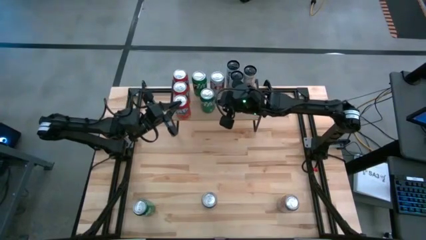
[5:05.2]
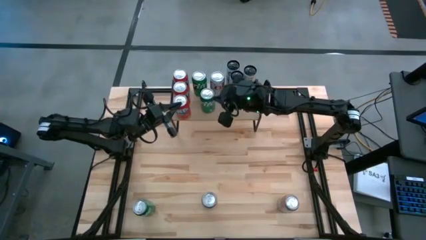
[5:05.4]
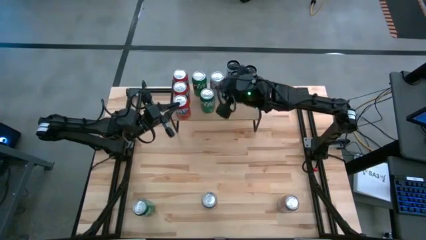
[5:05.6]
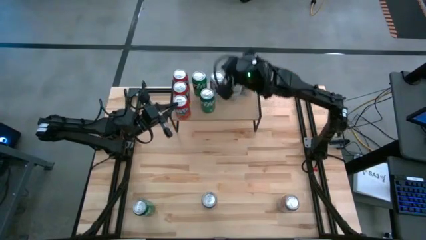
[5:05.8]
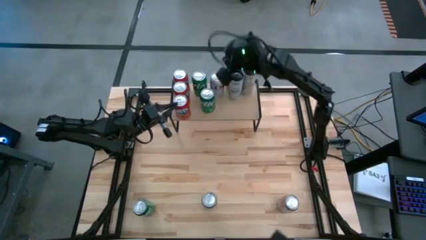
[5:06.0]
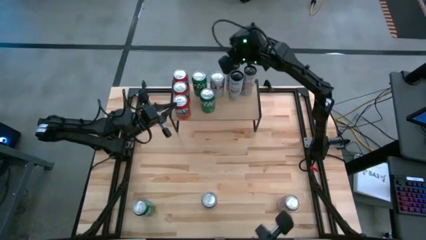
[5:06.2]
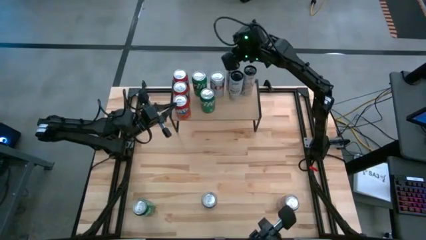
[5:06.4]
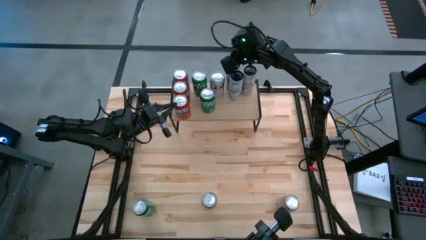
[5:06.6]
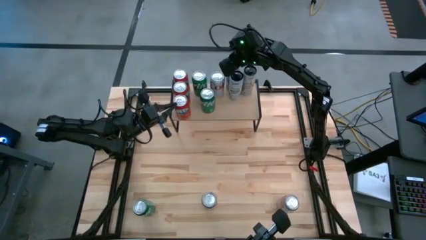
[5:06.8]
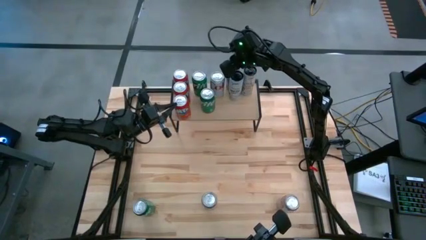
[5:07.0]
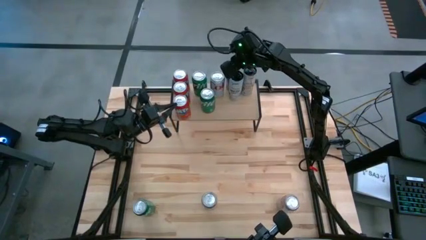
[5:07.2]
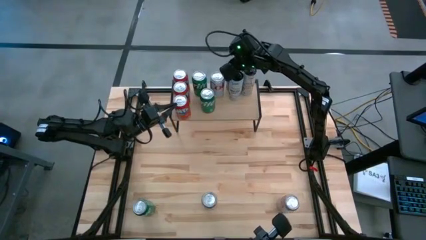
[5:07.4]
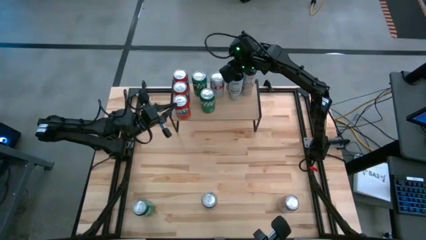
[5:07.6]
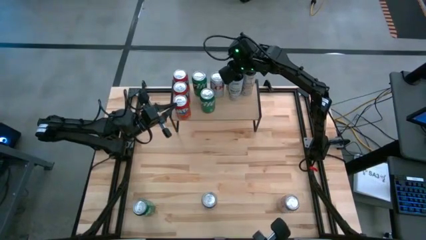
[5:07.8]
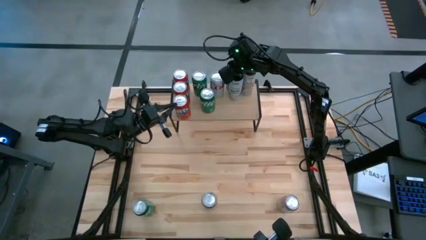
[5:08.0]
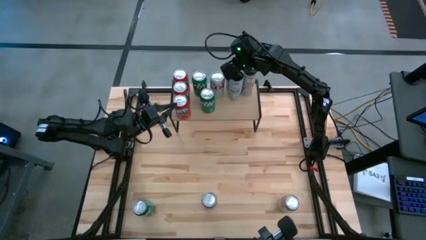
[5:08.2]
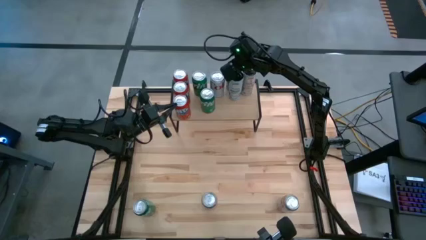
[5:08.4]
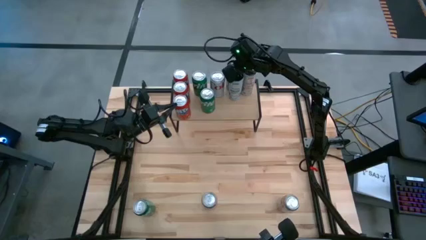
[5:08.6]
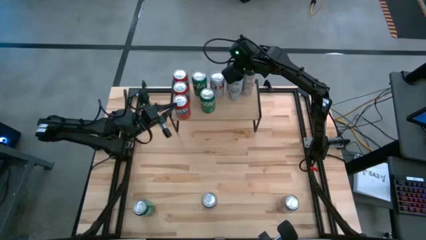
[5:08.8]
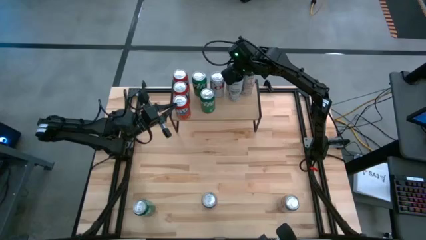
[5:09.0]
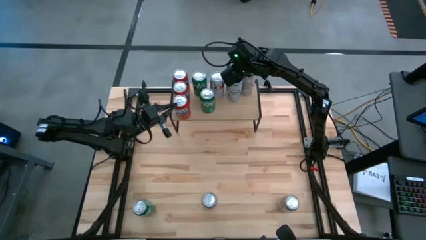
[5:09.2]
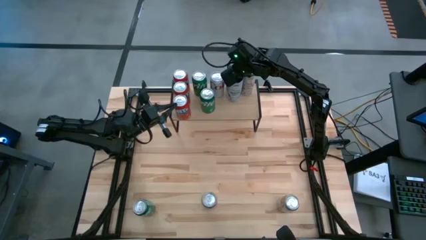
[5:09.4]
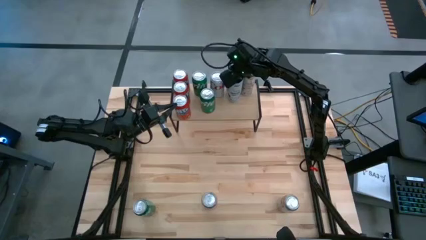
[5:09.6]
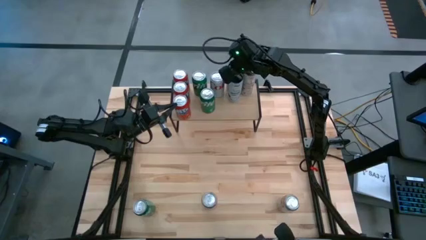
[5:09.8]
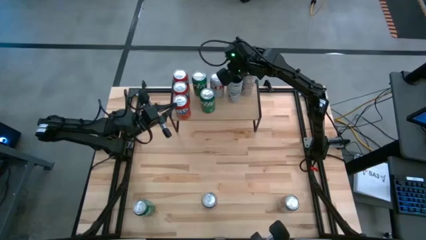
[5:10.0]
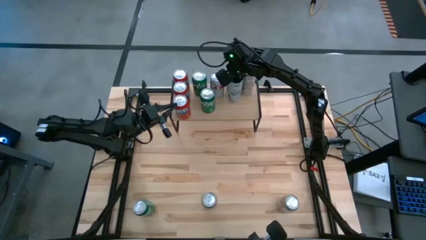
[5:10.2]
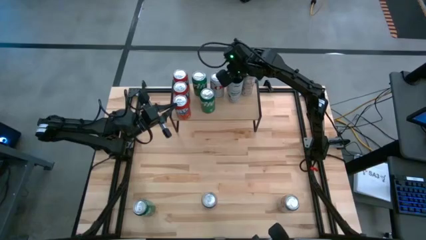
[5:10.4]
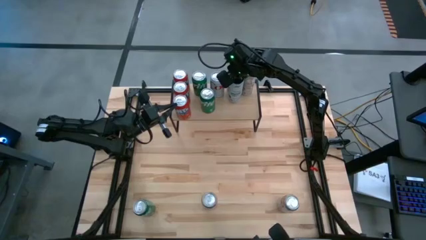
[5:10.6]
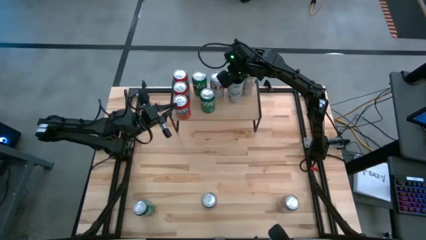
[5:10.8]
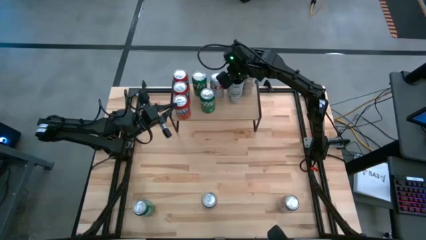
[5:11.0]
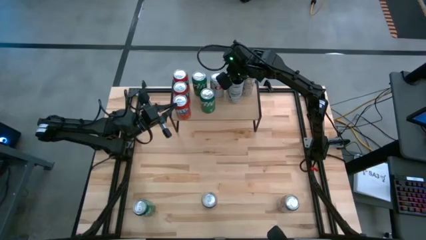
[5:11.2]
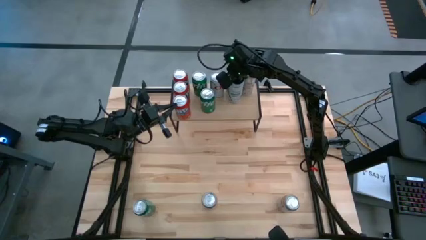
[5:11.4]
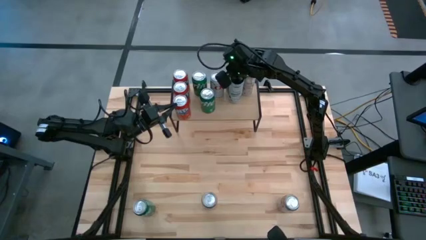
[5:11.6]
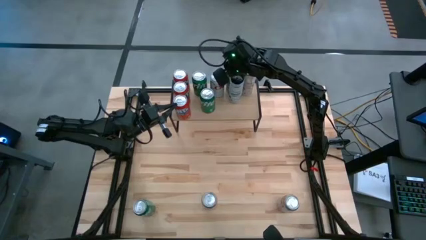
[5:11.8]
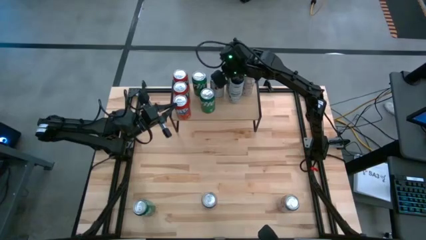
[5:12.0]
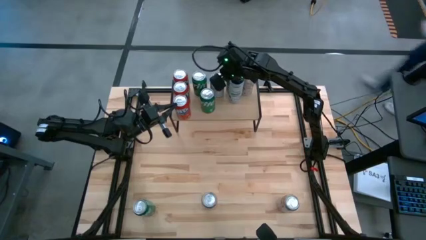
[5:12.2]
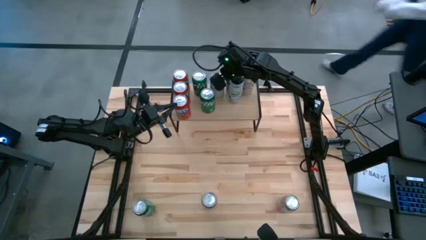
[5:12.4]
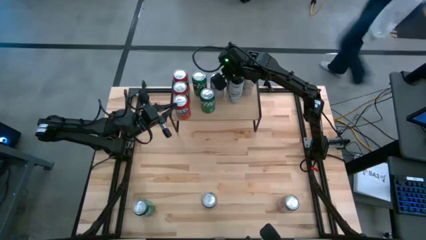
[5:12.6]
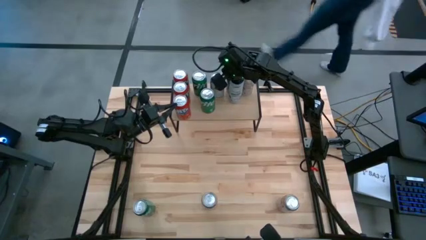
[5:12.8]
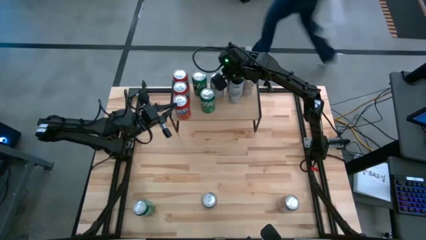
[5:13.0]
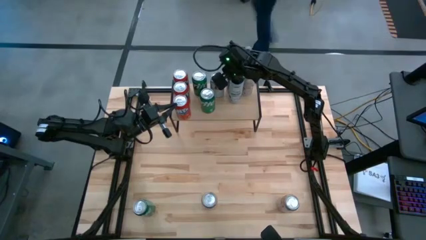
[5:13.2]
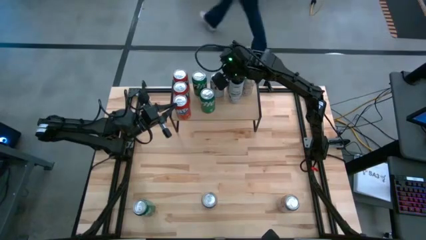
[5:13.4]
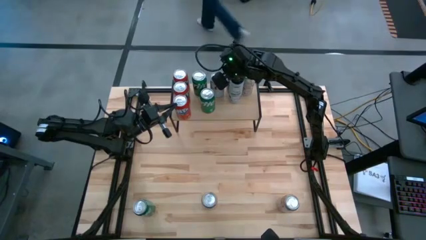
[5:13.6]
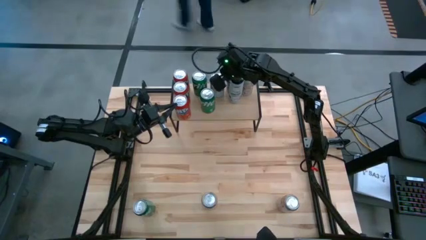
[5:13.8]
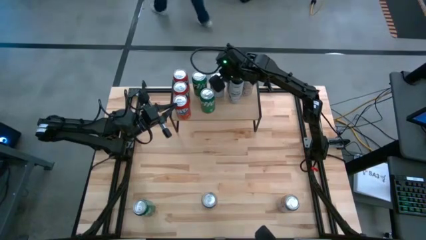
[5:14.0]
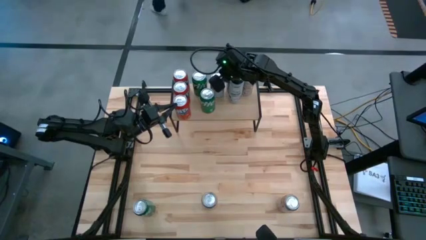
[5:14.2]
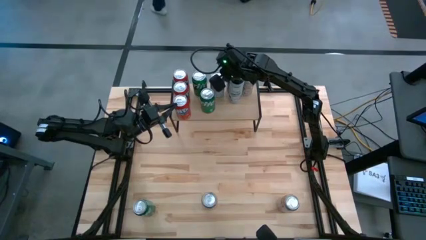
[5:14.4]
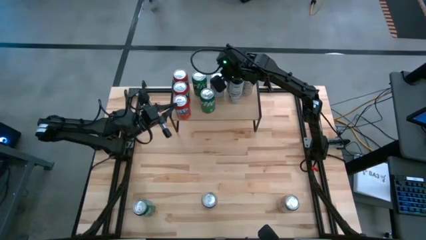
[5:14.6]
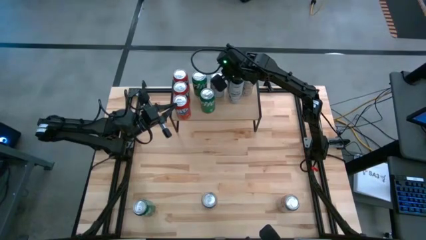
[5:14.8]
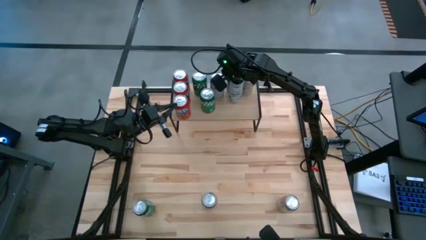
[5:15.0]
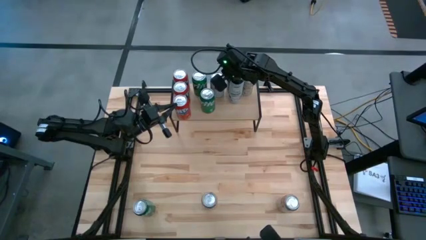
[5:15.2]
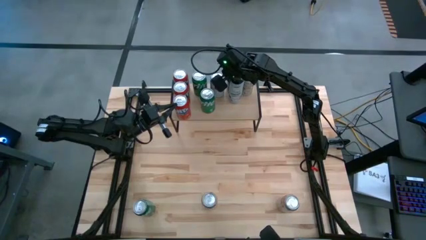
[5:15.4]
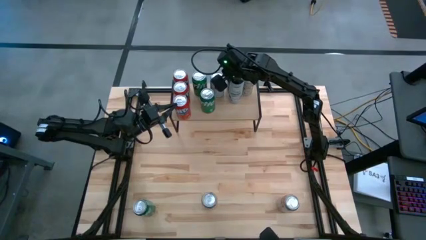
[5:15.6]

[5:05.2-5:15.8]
Task: Place canned beverage on shelf
Adjust the white-blue soda can

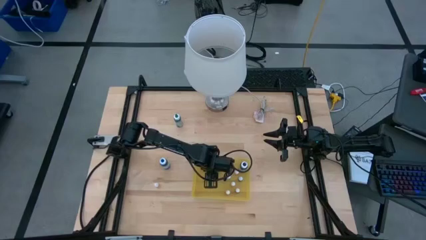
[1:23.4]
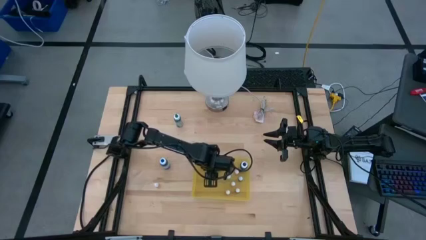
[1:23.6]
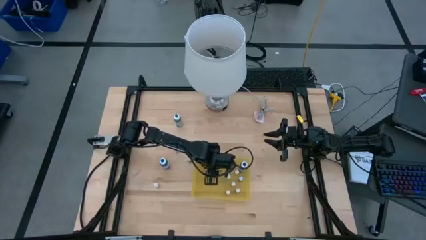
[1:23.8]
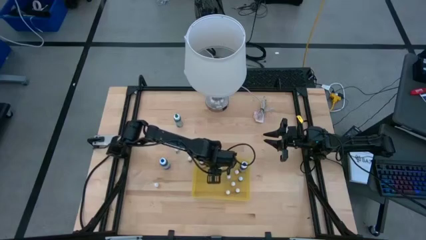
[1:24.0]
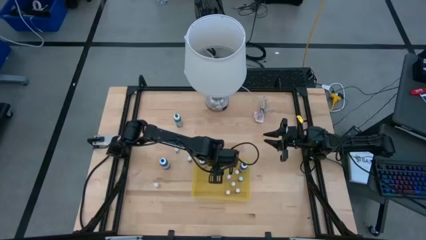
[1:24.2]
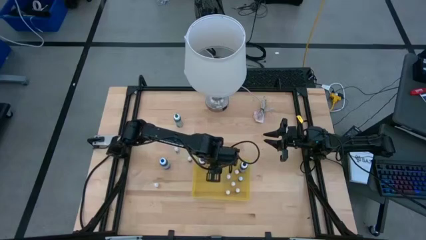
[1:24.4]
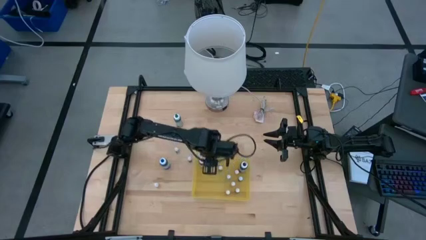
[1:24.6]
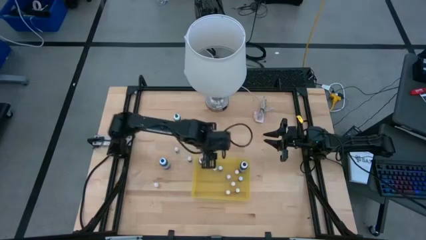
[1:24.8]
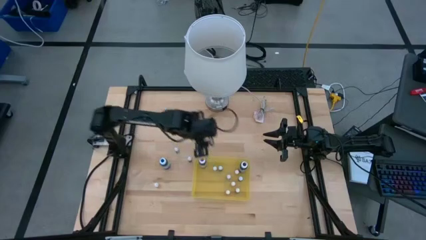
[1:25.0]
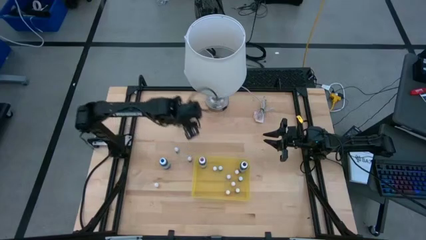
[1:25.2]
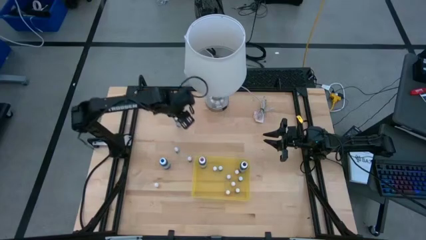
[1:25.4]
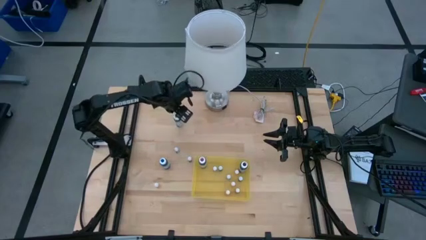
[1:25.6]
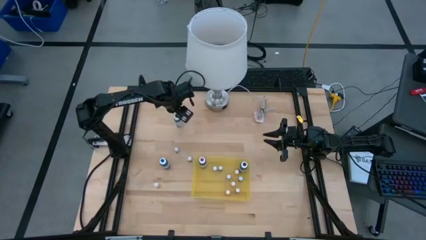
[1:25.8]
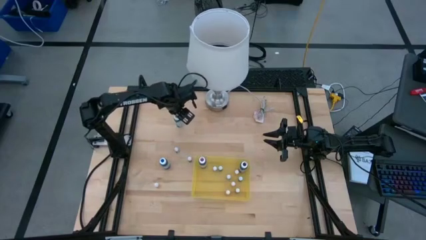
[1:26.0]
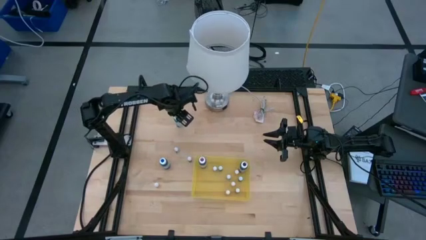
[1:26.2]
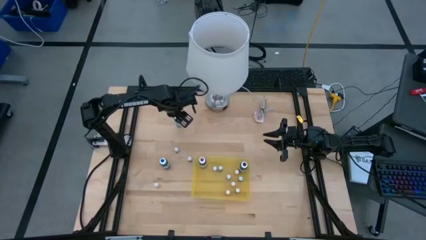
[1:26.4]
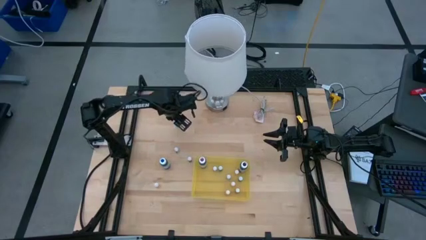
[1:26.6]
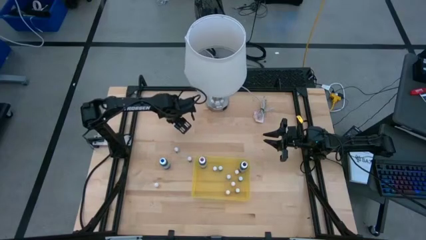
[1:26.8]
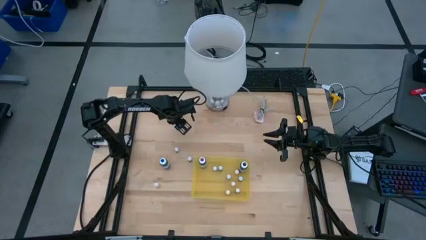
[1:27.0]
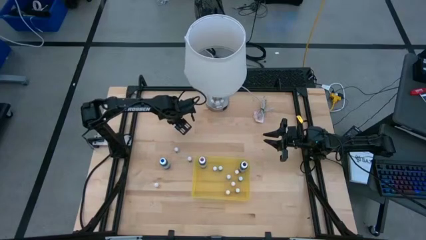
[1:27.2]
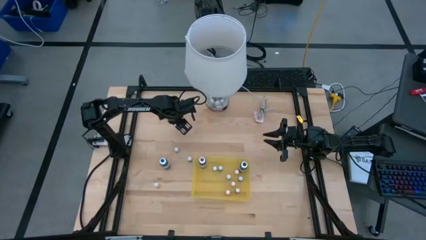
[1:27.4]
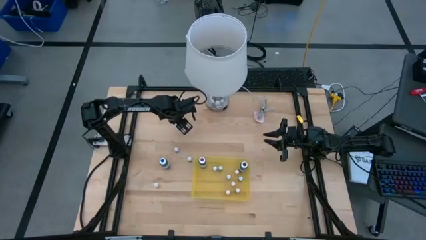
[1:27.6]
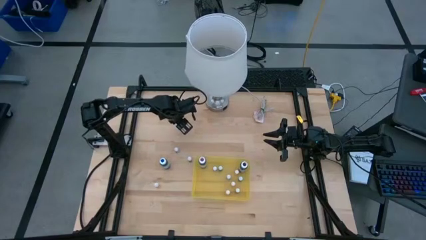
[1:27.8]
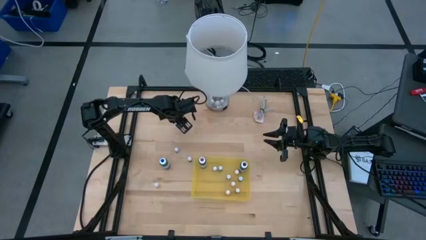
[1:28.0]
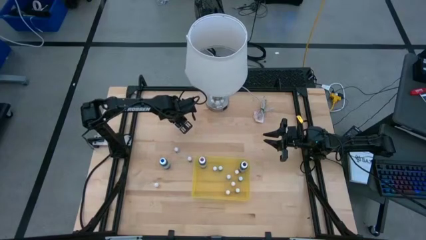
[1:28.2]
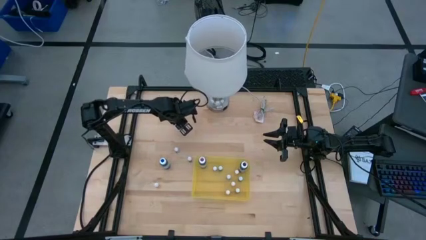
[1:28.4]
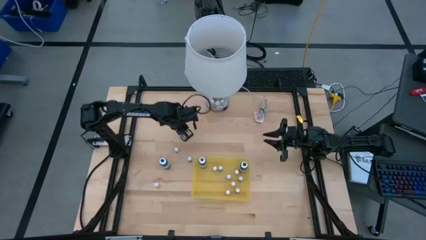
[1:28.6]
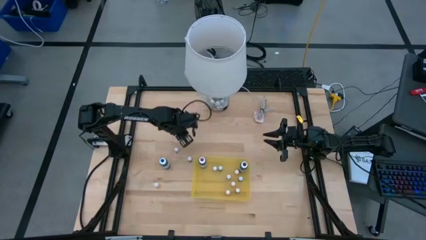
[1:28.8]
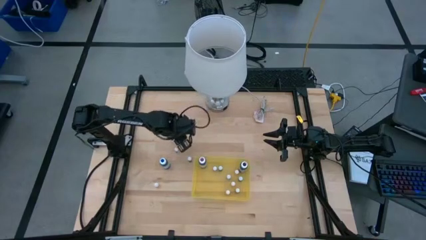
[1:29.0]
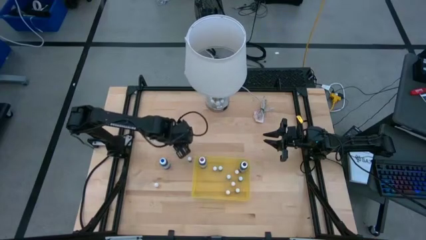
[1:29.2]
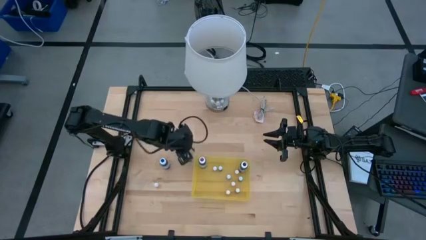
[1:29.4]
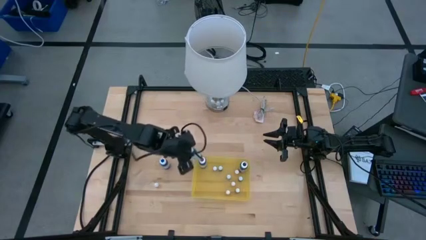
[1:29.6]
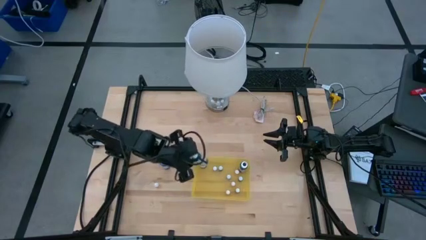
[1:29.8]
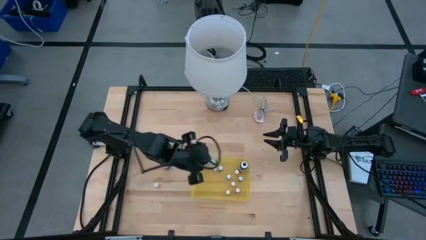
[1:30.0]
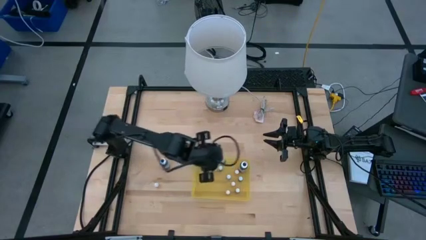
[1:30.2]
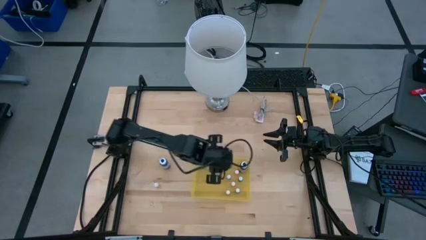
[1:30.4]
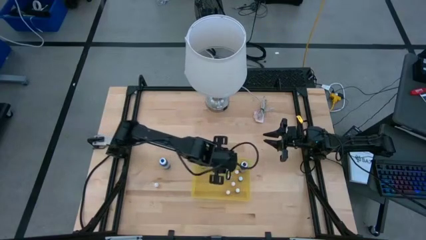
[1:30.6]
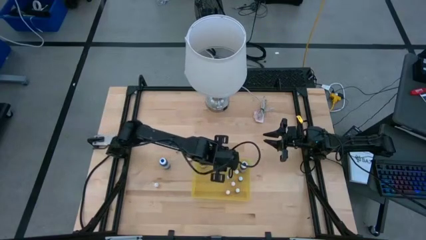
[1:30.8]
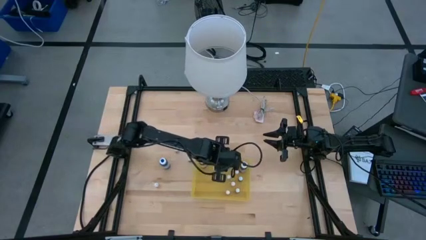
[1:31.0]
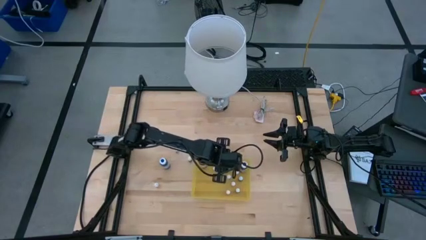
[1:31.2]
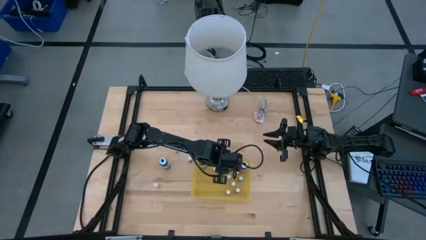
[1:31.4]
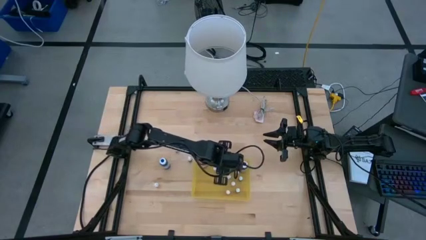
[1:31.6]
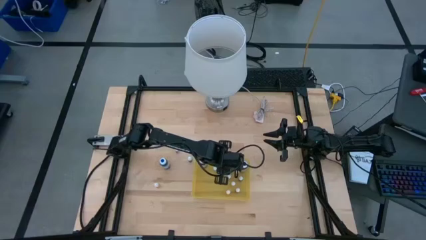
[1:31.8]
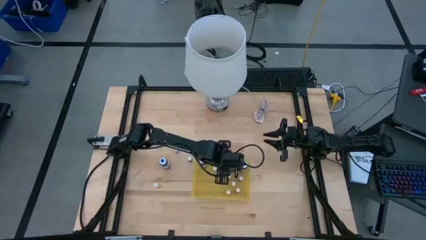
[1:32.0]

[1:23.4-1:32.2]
Task: Pick & Place food coloring
Put the large green food coloring bottle into the transparent bin
